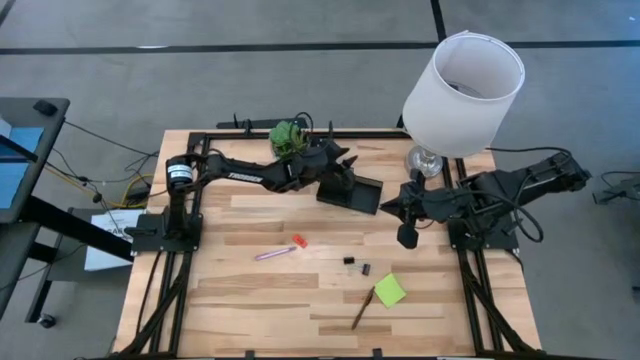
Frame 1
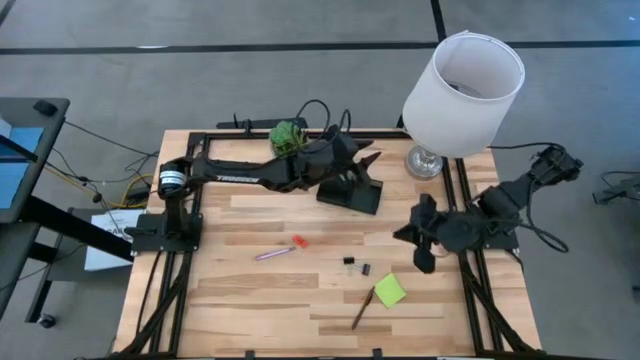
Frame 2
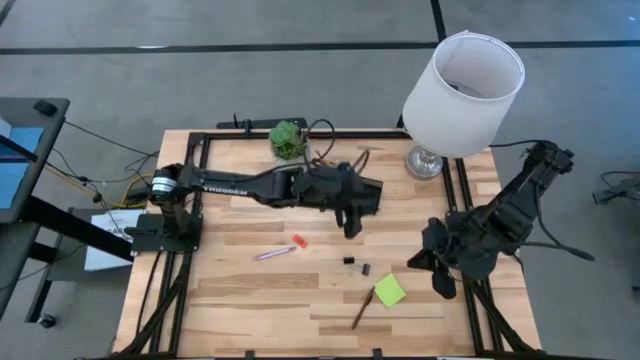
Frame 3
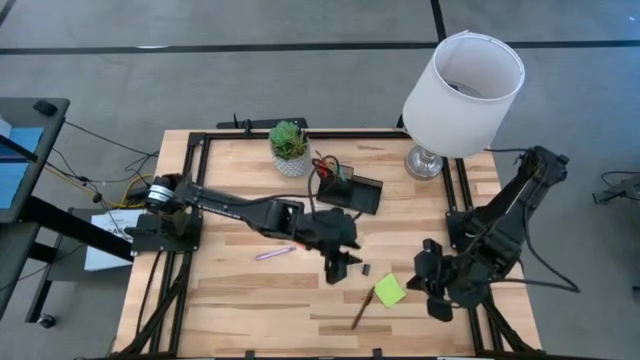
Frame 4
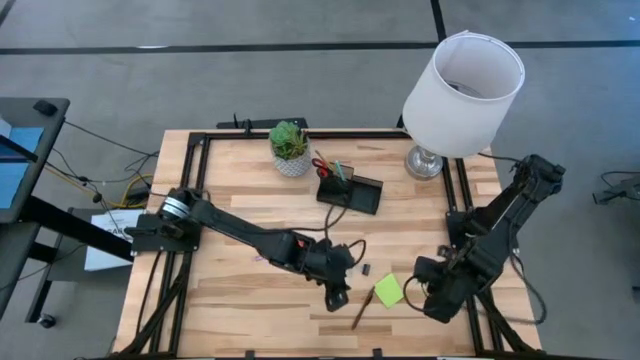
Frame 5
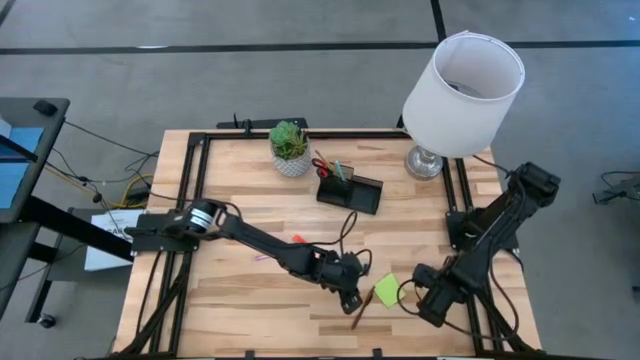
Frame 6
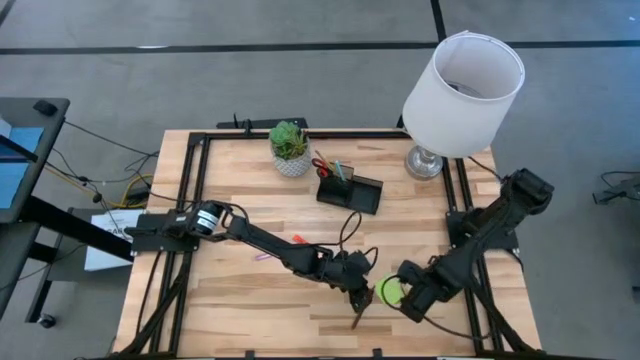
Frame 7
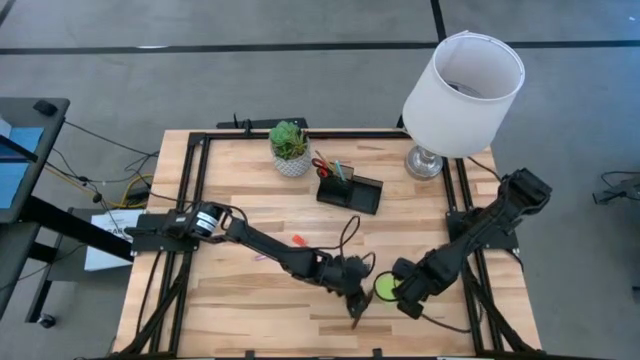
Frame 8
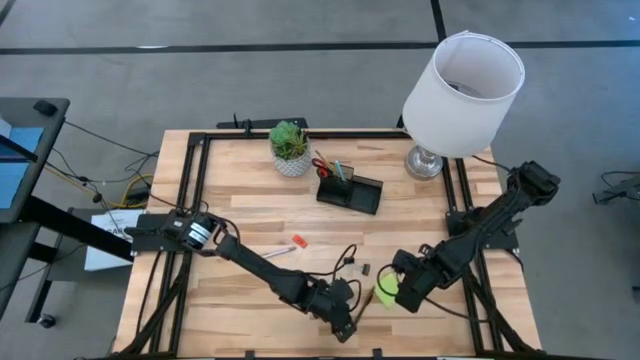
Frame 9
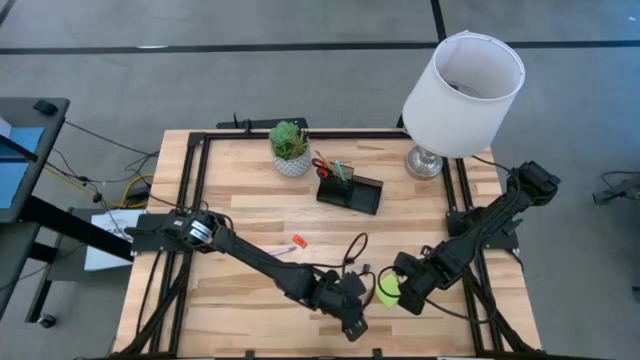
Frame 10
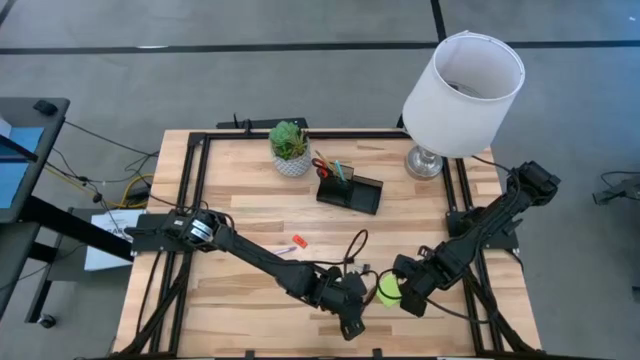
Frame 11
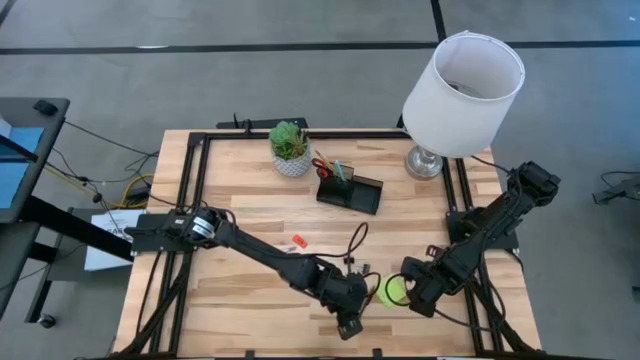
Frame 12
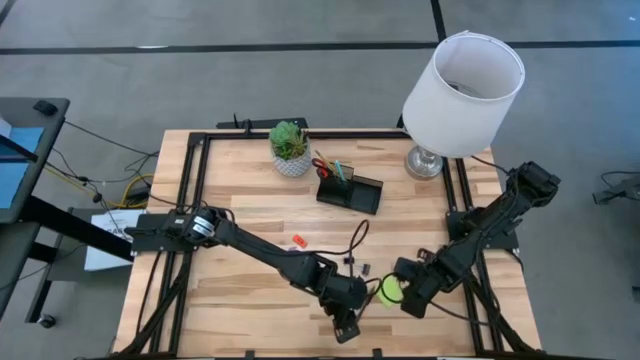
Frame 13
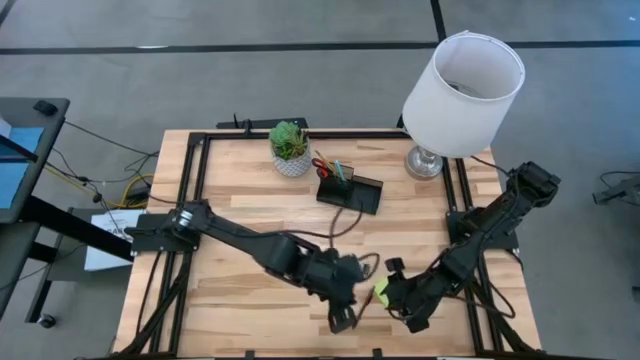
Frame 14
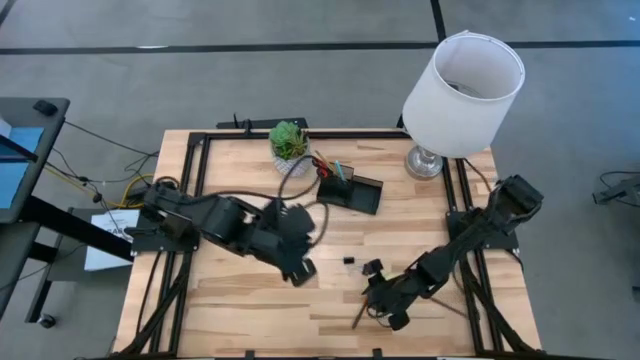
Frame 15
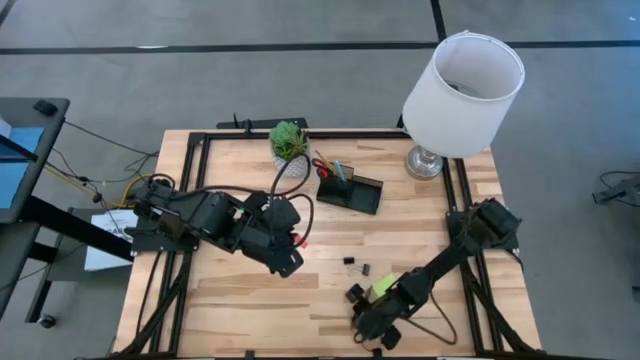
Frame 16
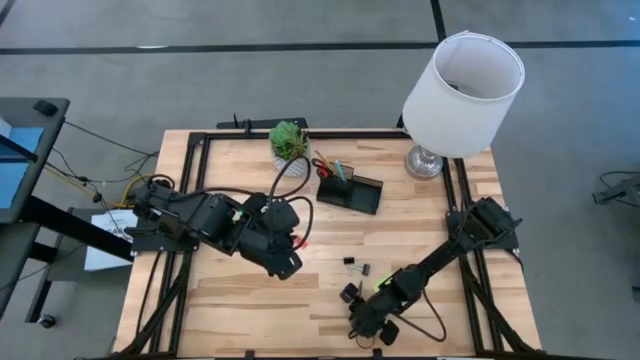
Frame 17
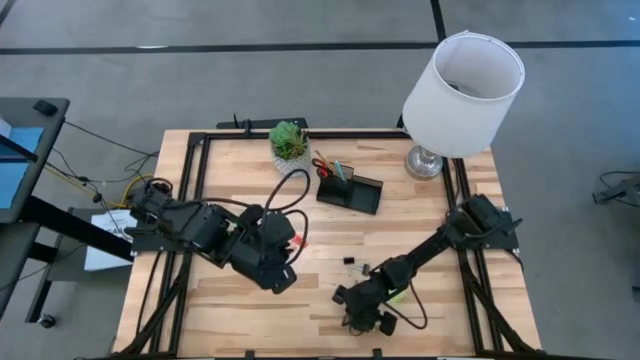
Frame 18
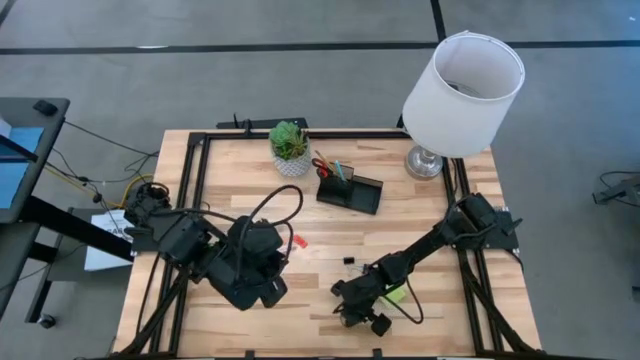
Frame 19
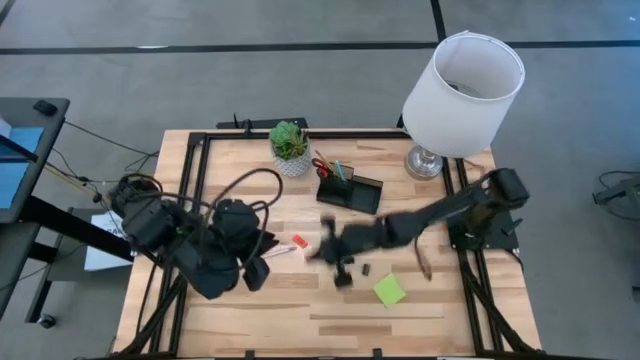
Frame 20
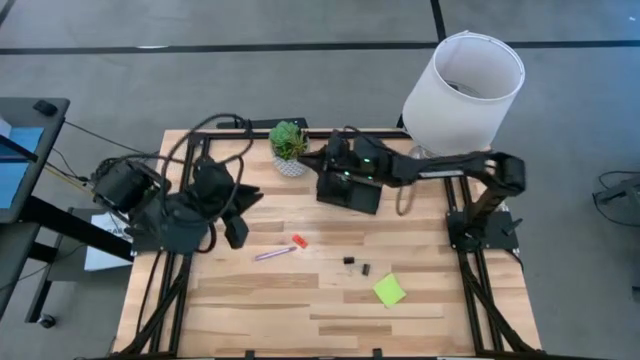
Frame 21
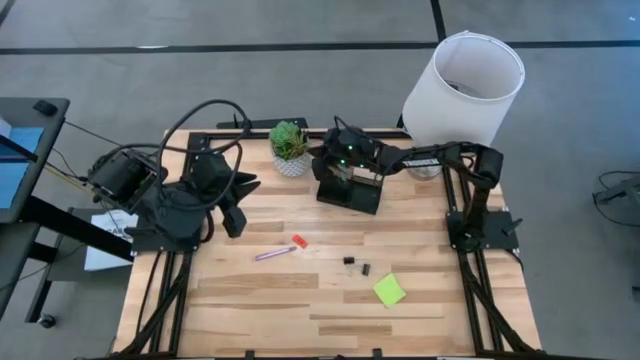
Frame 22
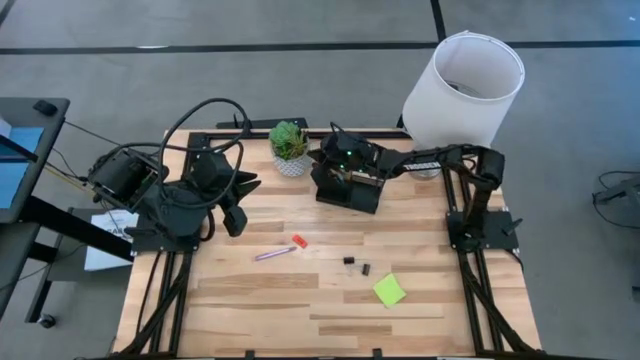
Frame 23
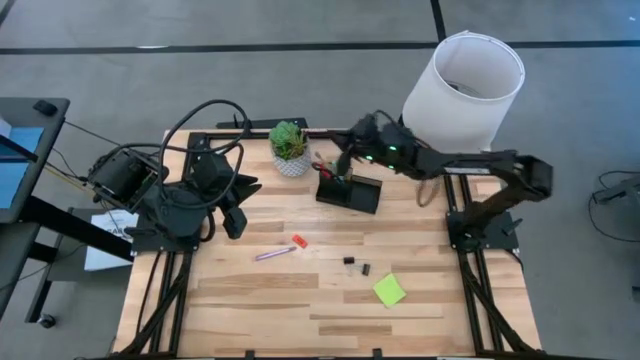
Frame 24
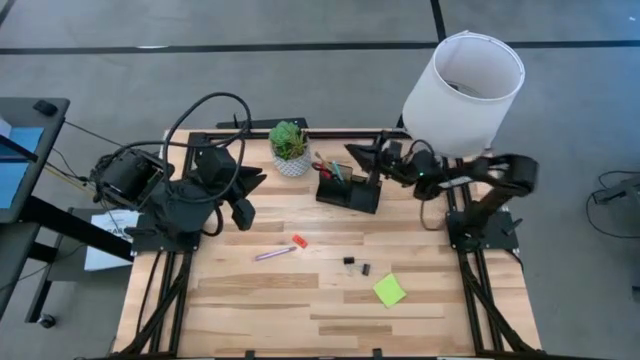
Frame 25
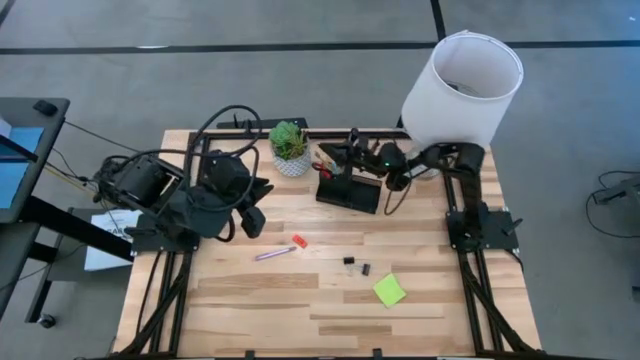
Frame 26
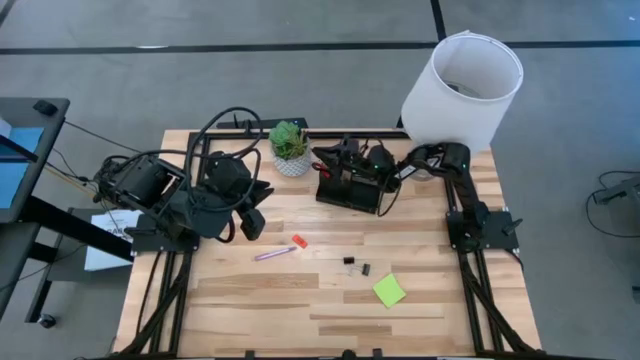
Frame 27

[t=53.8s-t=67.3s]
Task: Pick and place office supplies into organizer
Put the brown pen into the black desk organizer

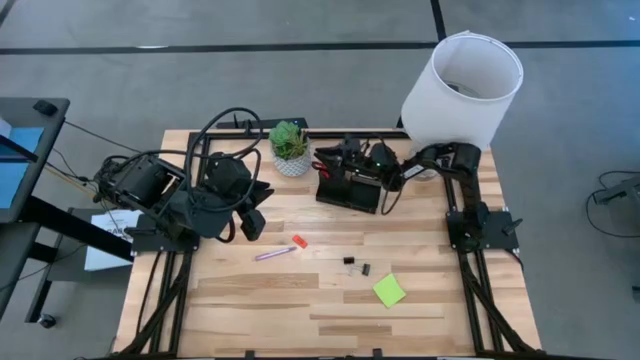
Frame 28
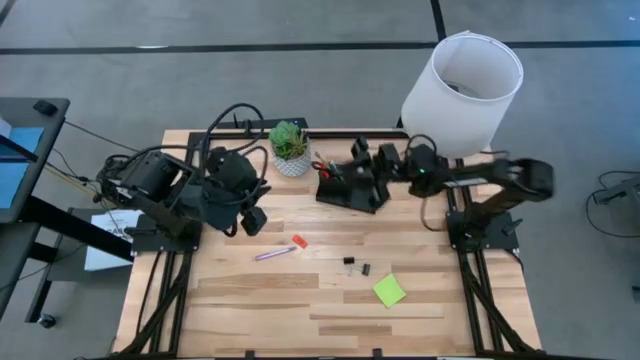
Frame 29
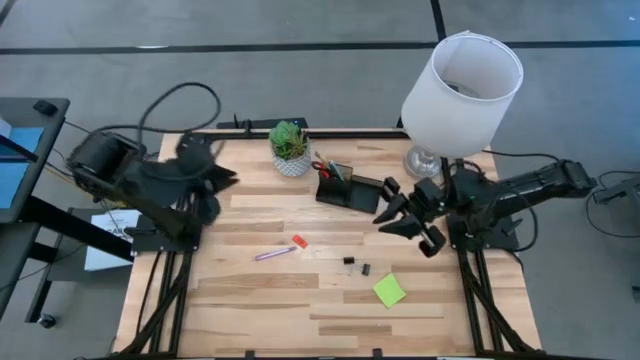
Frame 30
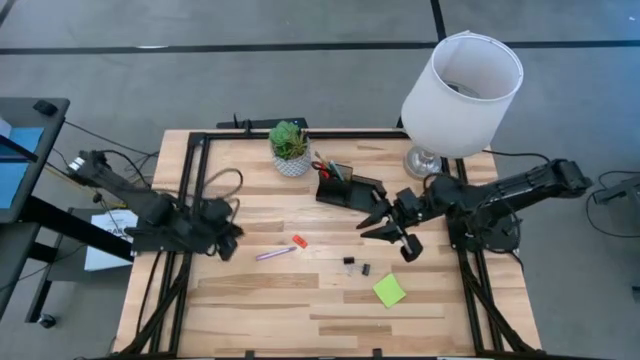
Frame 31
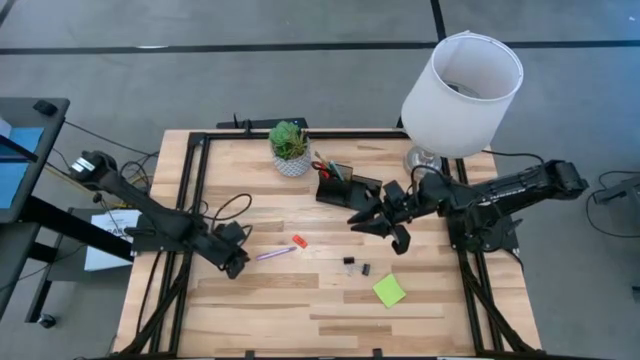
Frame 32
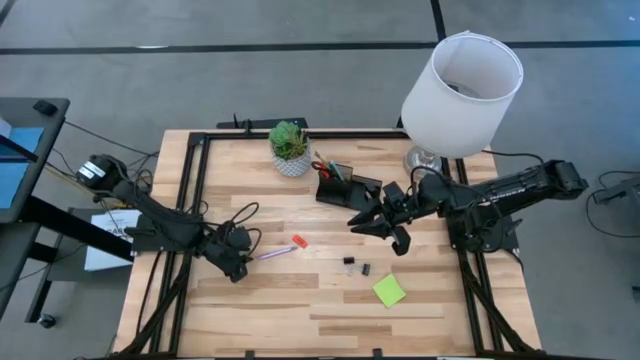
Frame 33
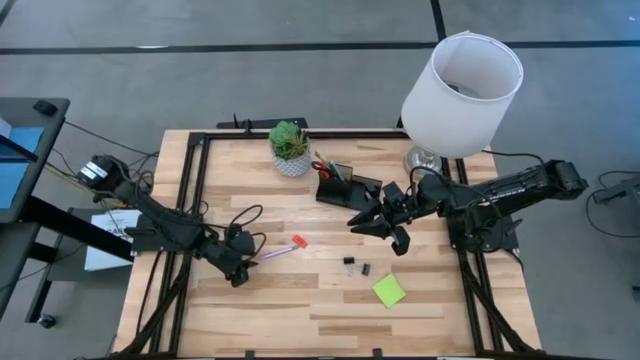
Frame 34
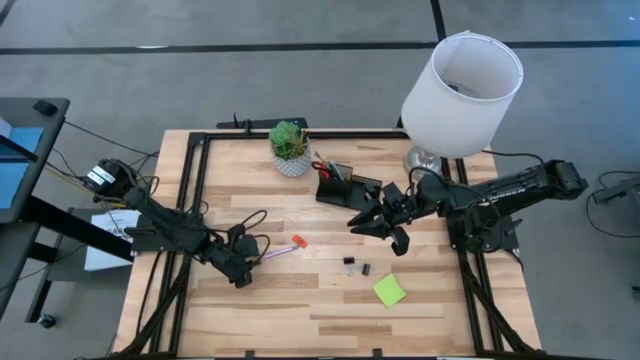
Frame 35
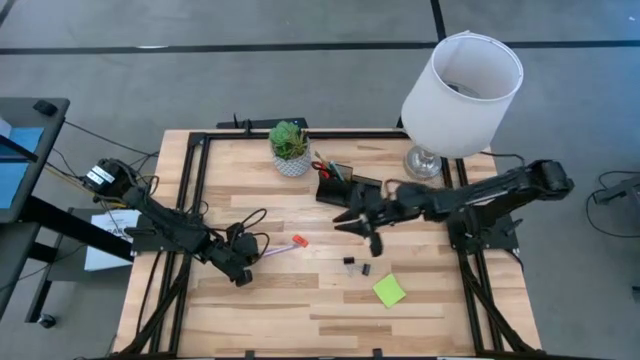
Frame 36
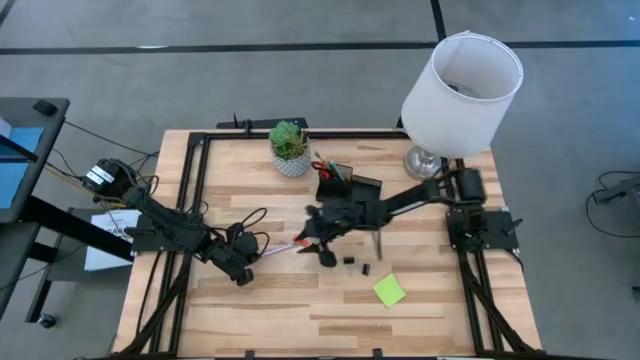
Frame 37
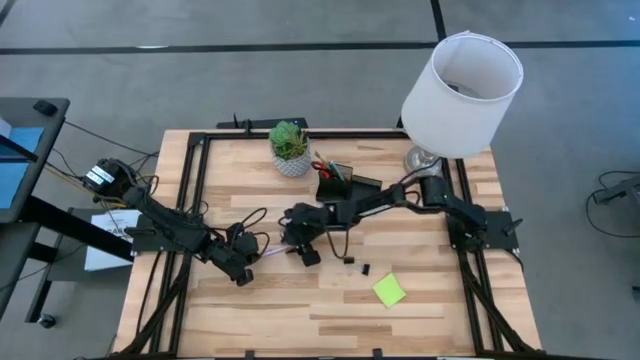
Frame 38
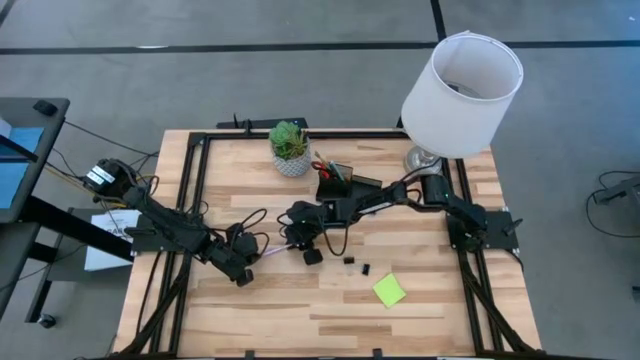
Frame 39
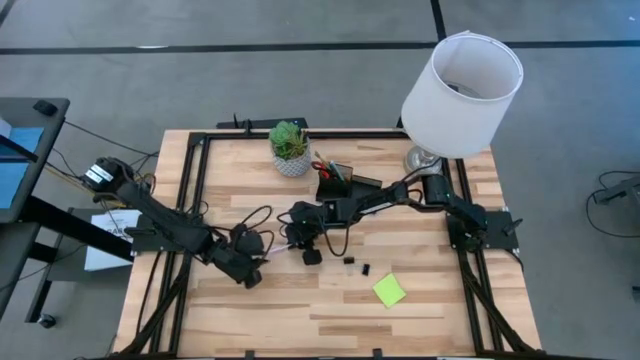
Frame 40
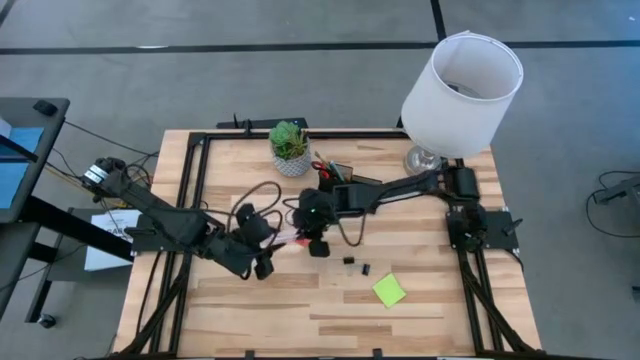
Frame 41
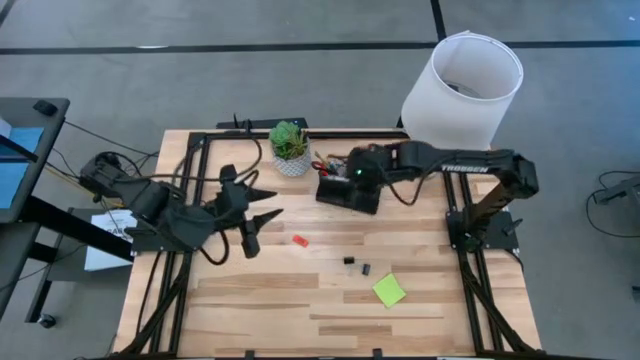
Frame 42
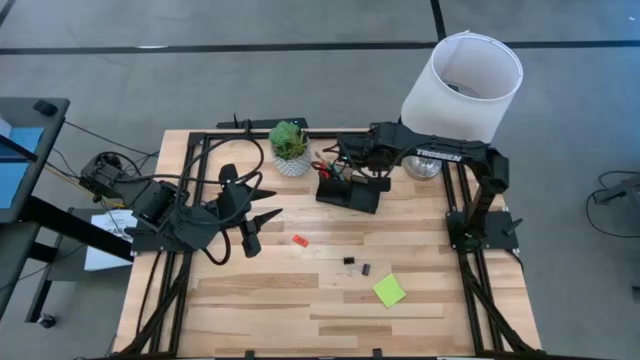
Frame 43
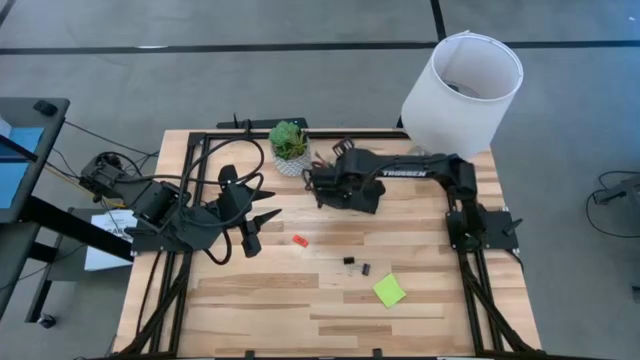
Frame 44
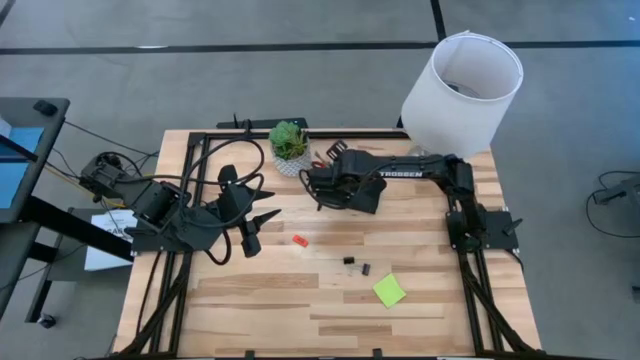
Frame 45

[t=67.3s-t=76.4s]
Put the purple pen into the black desk organizer
